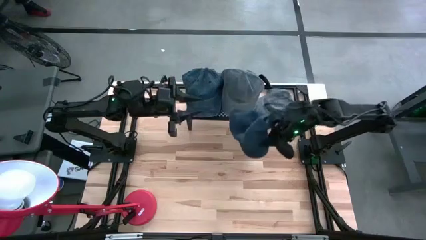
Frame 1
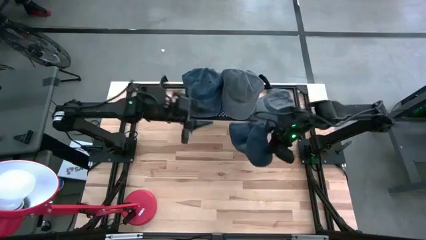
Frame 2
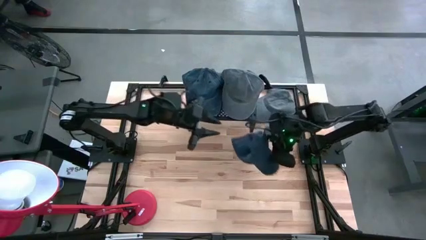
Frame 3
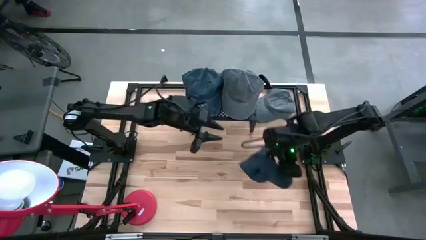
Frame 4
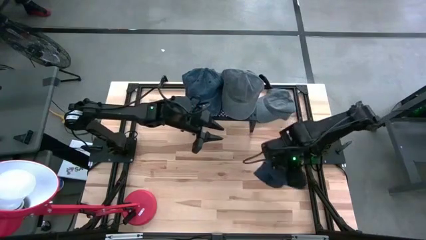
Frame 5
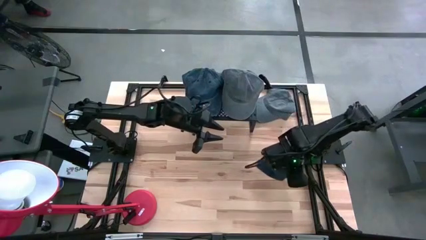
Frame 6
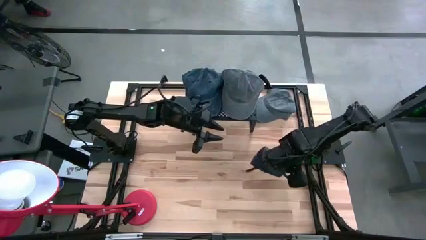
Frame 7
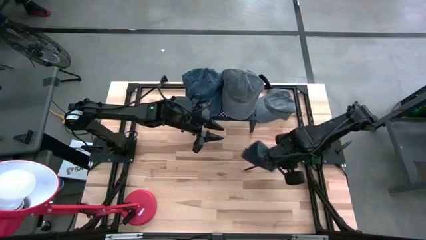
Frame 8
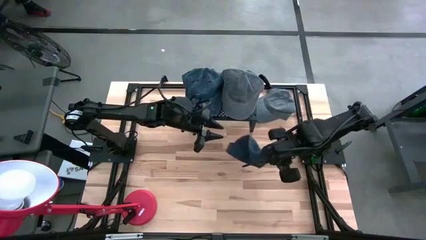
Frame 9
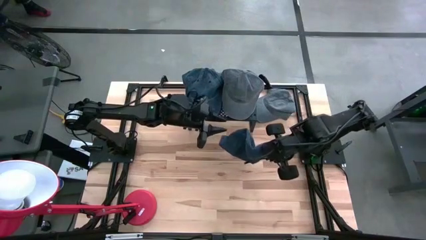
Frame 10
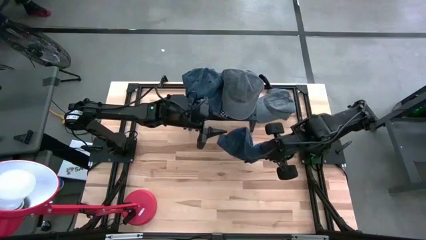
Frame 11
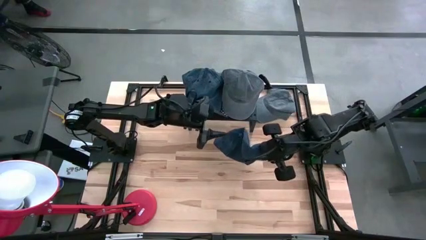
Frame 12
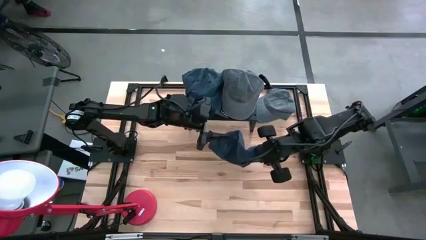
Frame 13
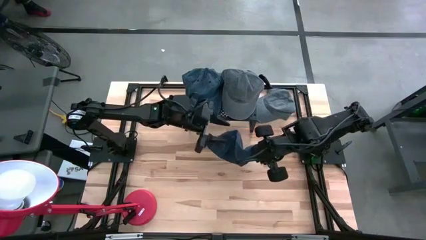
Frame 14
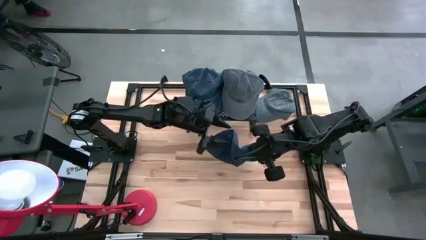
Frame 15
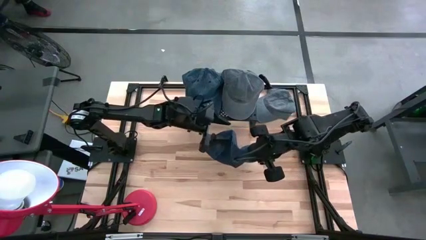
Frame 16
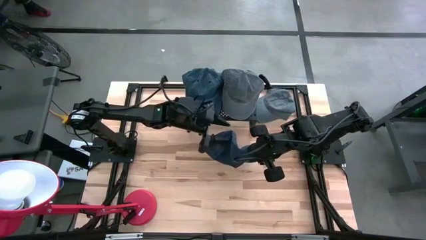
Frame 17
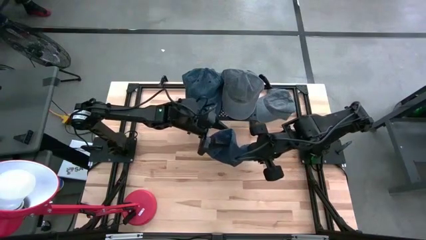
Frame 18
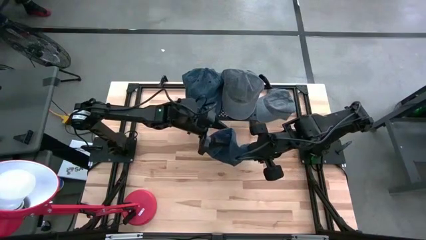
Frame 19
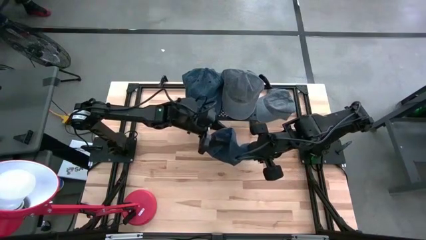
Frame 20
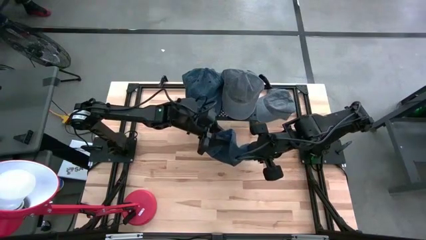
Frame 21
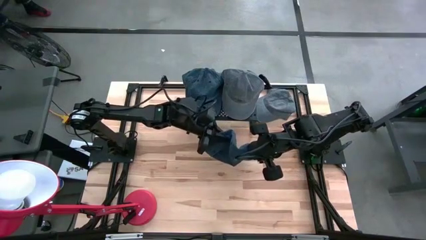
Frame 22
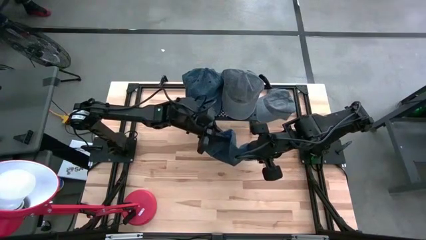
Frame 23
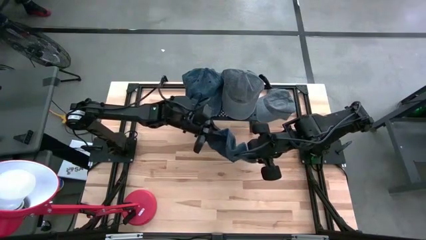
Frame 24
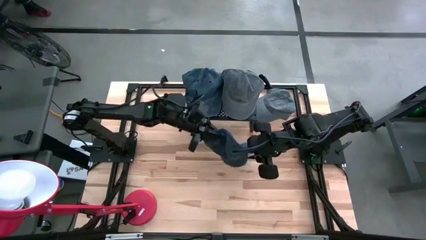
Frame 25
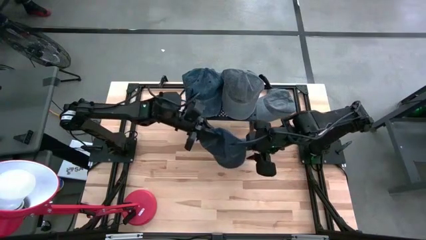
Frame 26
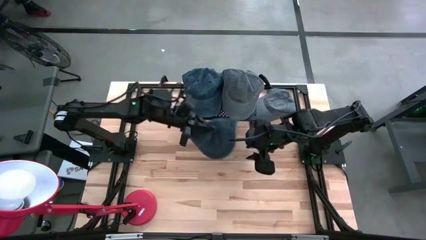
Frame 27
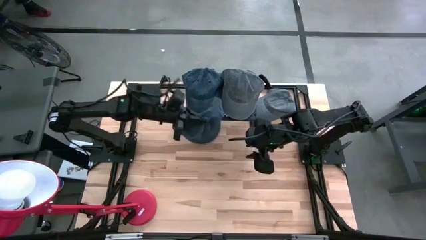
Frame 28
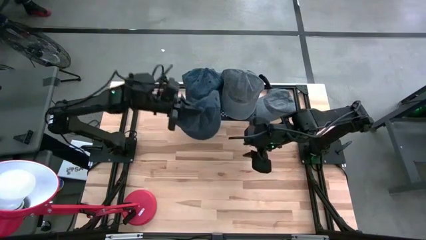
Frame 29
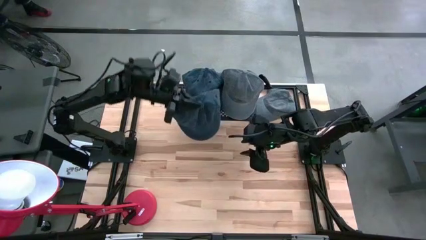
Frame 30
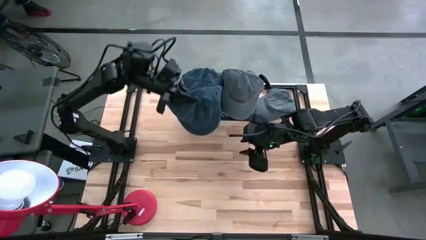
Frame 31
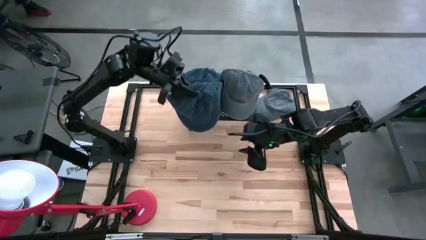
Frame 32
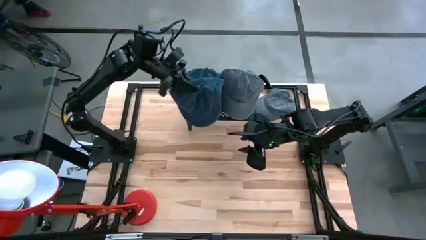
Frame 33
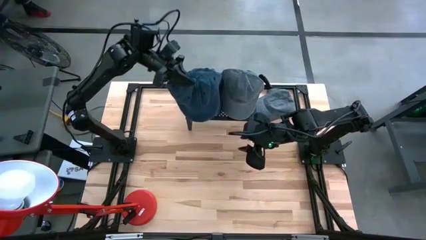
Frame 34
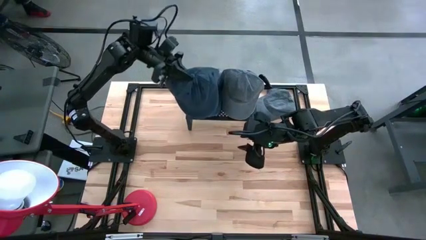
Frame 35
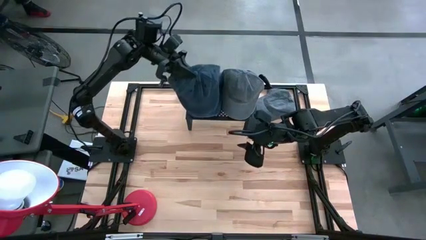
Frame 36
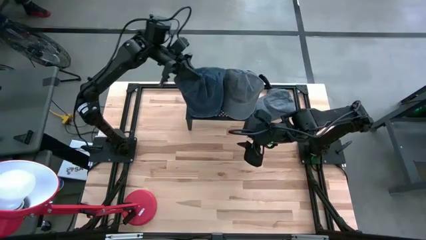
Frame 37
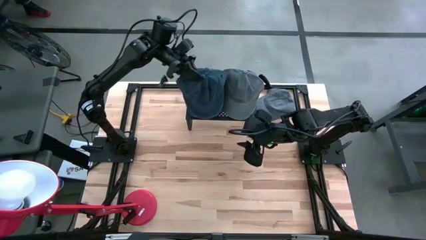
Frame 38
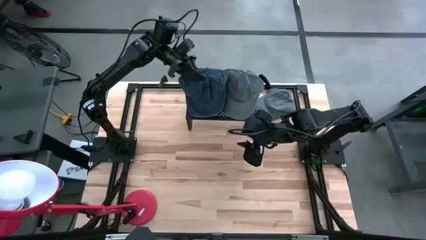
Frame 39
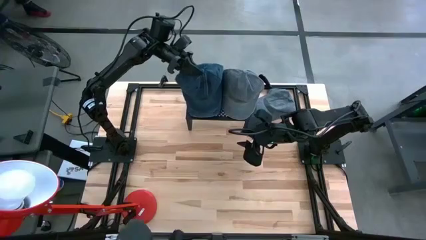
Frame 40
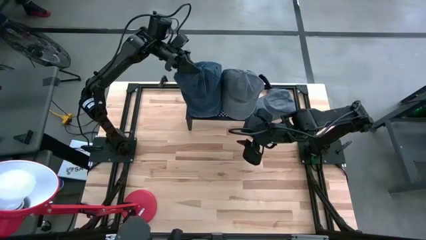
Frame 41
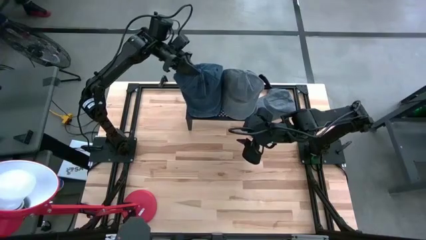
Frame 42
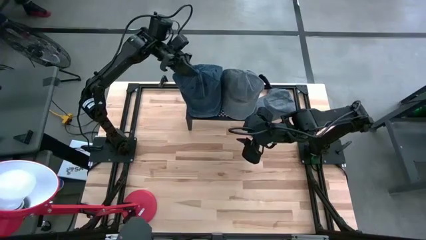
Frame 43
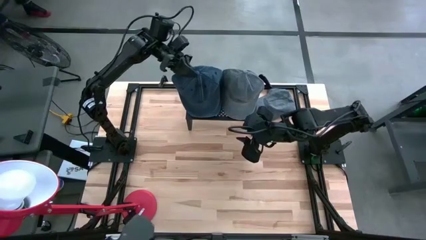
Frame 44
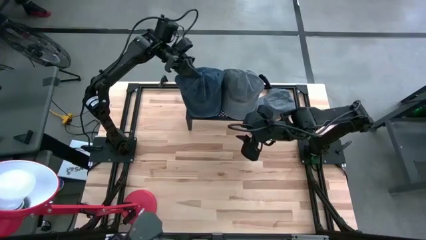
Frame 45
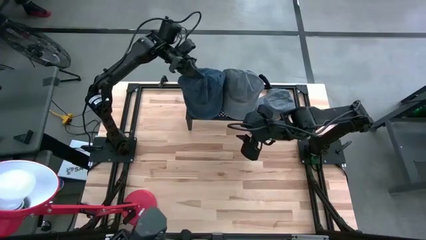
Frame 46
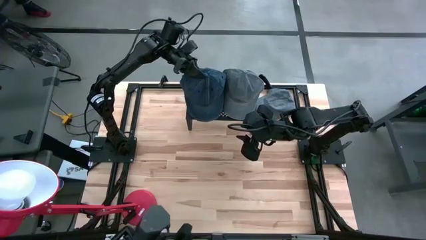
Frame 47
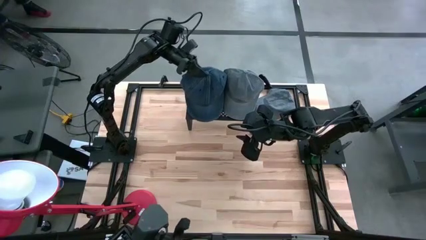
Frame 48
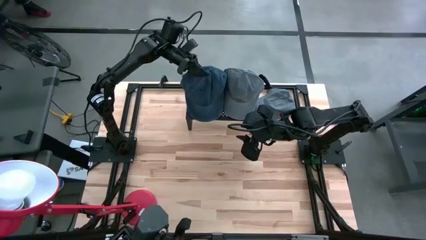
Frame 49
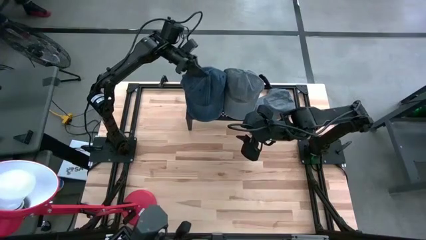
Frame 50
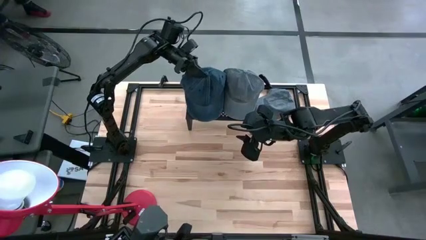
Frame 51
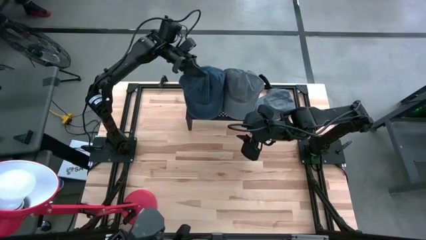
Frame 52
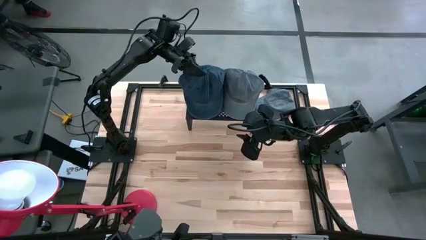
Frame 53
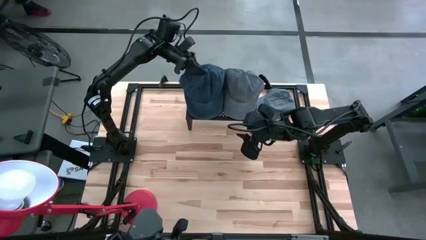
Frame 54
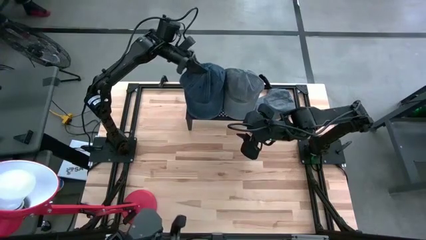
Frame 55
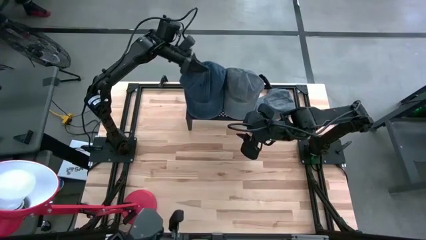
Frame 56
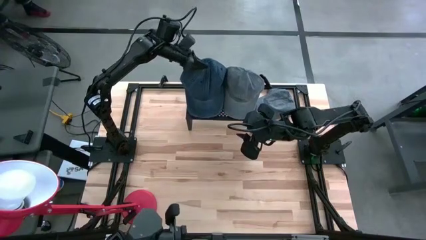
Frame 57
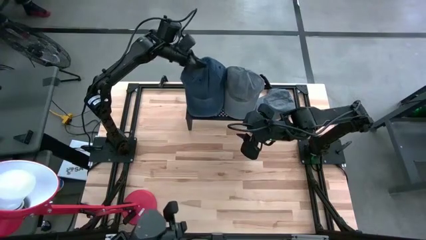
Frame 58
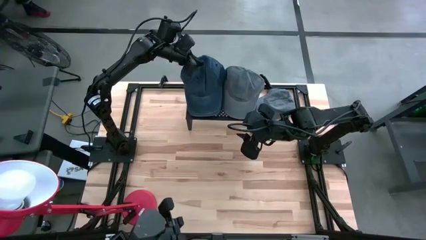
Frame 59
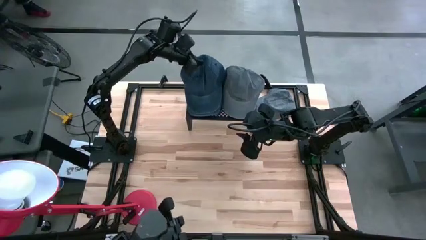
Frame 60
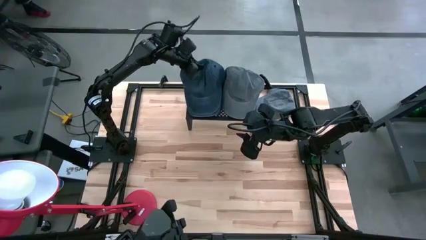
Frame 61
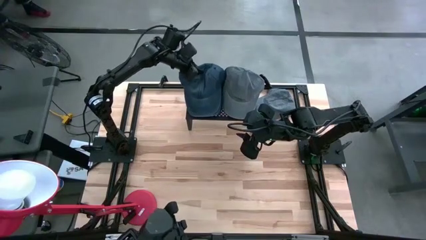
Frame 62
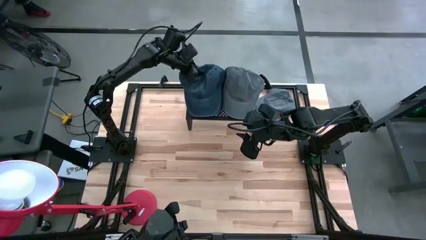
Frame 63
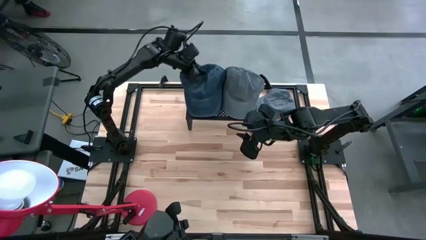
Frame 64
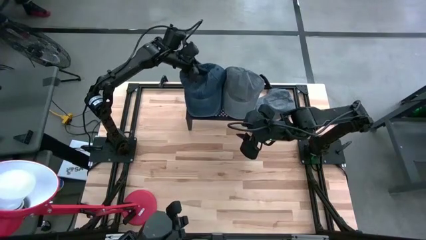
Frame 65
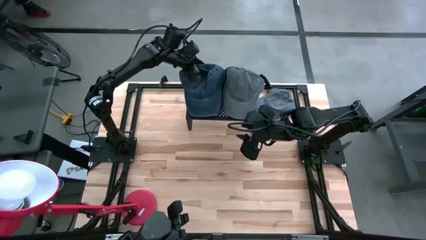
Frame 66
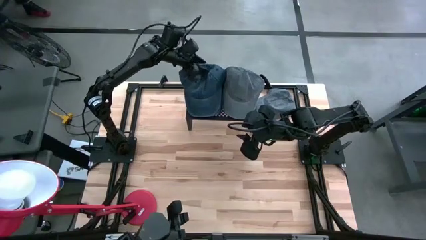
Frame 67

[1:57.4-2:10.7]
Task: Pick & Place hat
Stack the blue cap on top of the stacked blue caps on the shelf

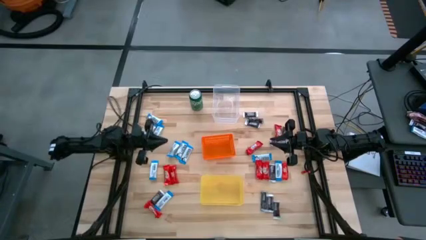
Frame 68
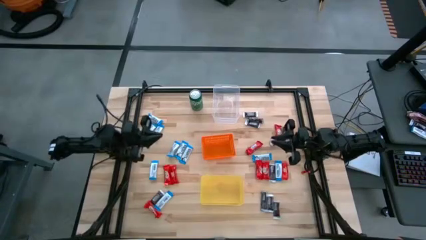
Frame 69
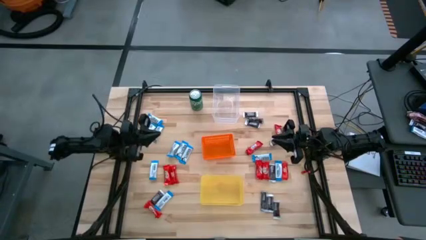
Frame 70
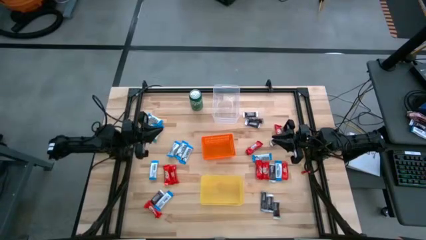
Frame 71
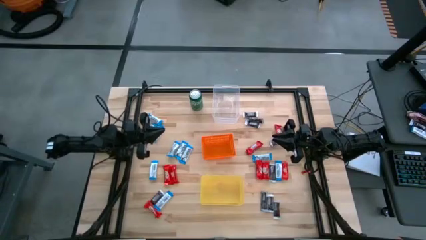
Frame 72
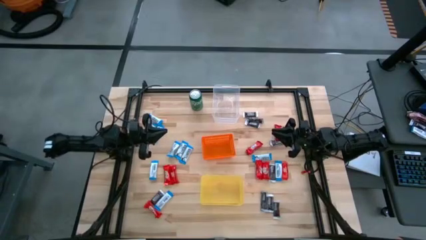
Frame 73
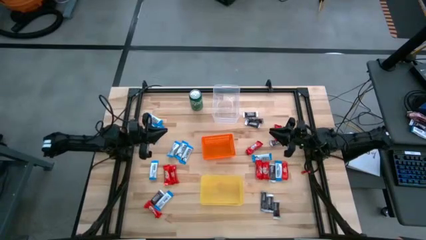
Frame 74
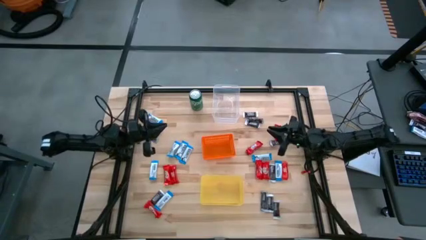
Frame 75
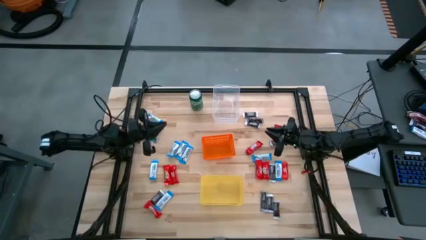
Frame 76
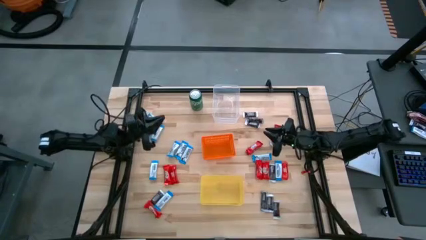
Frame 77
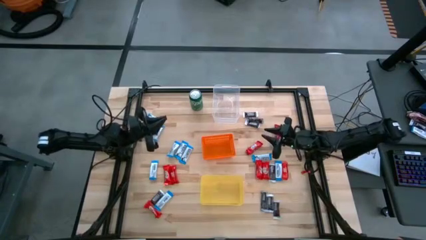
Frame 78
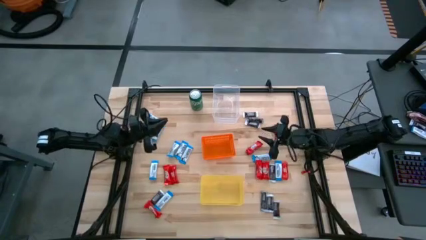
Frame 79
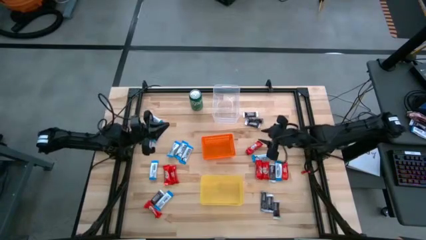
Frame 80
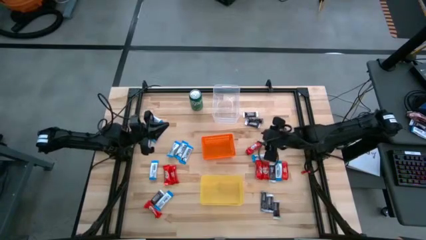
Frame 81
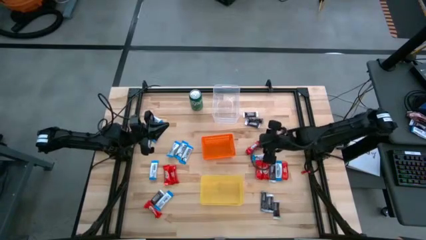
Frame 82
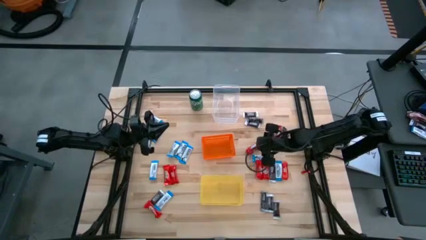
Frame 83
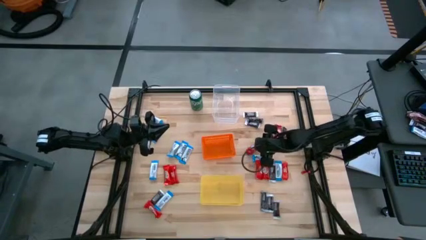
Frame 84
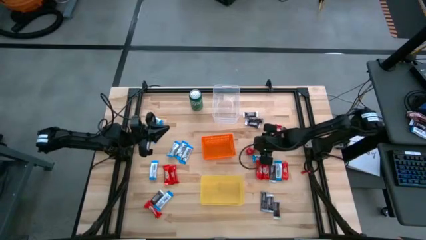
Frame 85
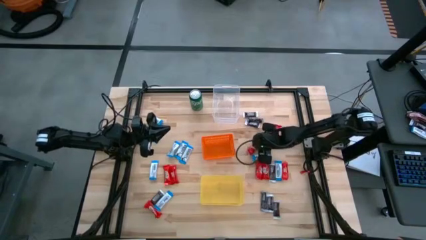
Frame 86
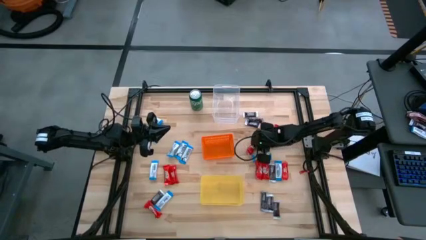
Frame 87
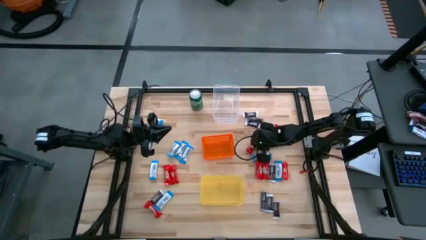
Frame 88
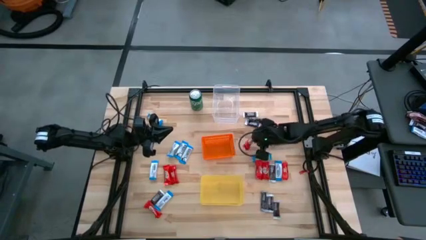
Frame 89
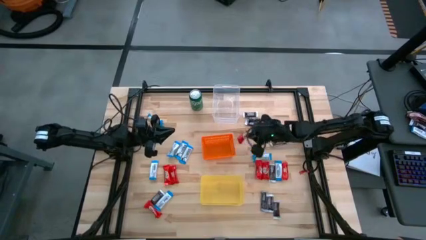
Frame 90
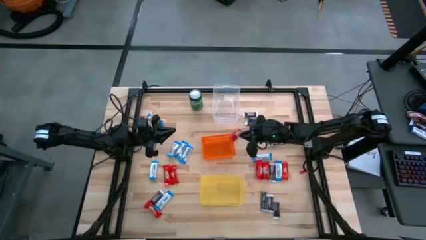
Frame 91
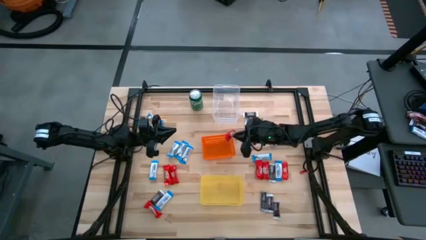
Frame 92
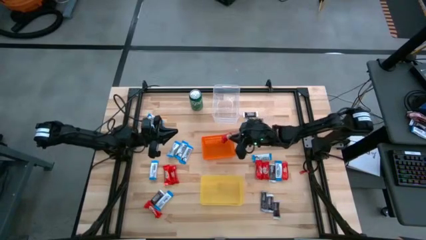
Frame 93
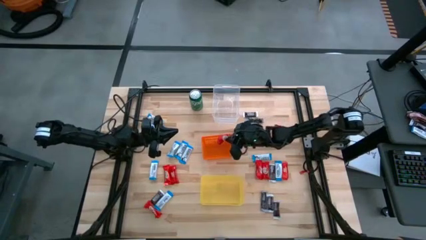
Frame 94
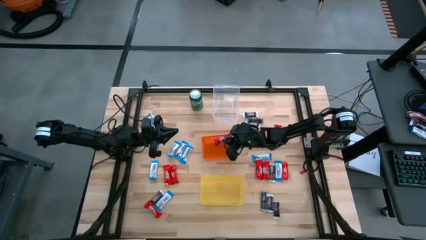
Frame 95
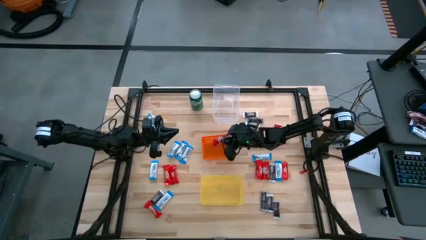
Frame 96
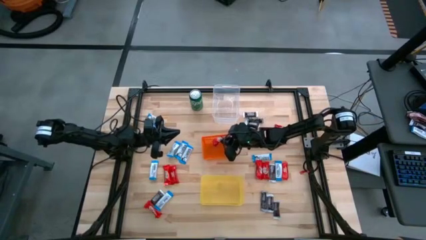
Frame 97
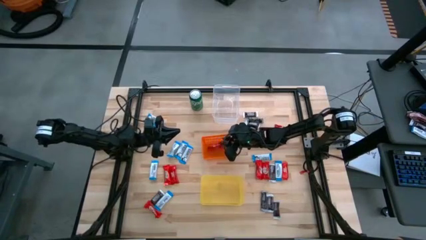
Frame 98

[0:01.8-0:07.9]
Task: Sort candy
Put the red candy into the orange bin
